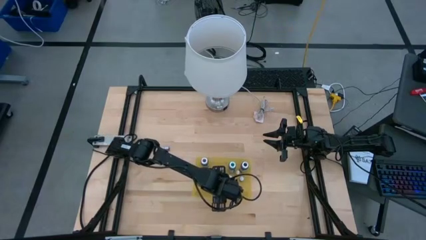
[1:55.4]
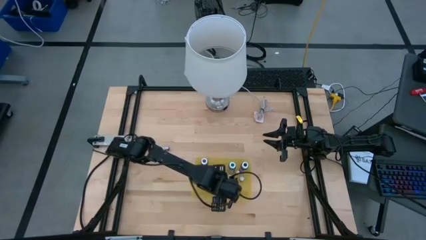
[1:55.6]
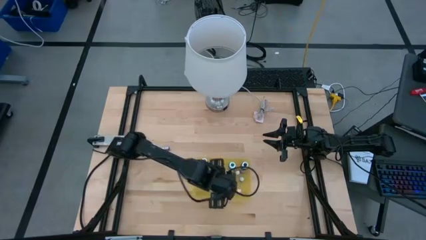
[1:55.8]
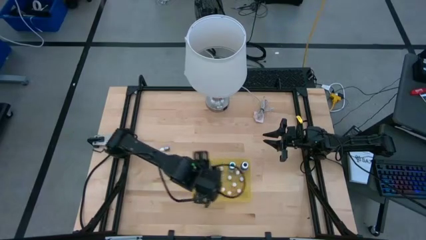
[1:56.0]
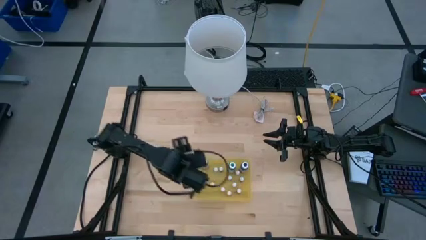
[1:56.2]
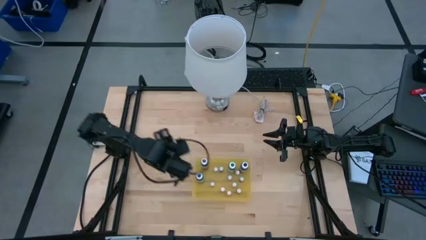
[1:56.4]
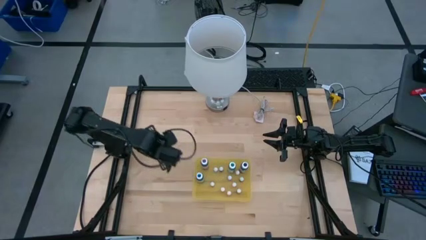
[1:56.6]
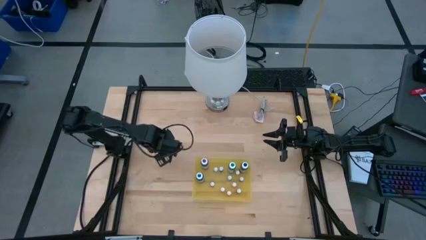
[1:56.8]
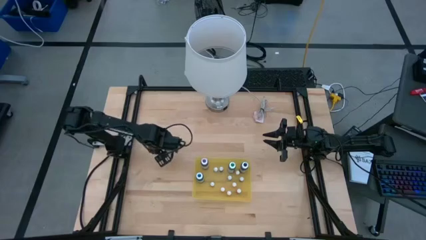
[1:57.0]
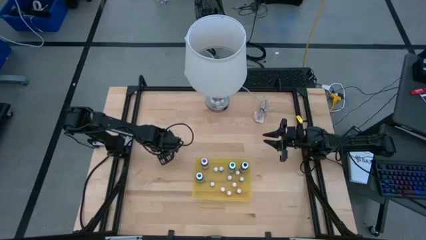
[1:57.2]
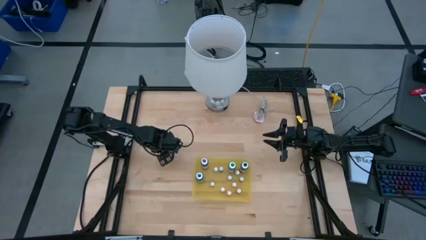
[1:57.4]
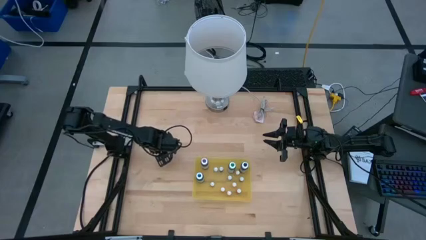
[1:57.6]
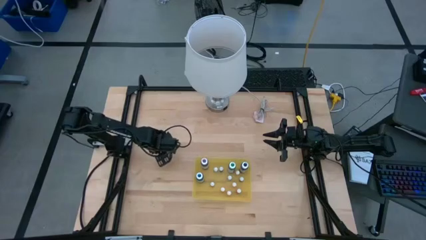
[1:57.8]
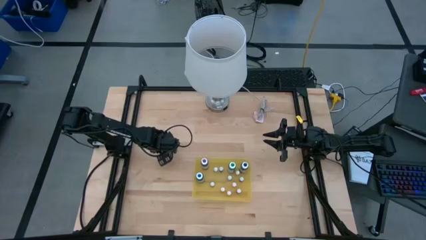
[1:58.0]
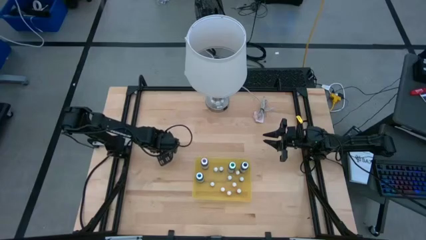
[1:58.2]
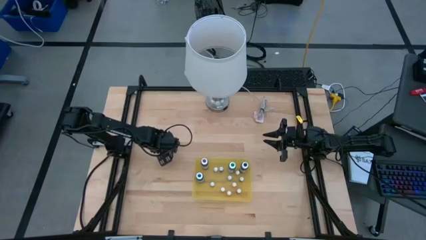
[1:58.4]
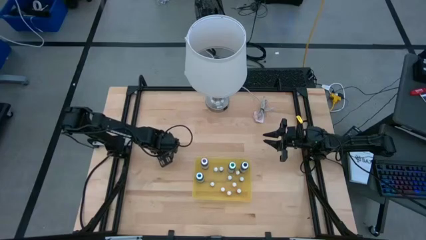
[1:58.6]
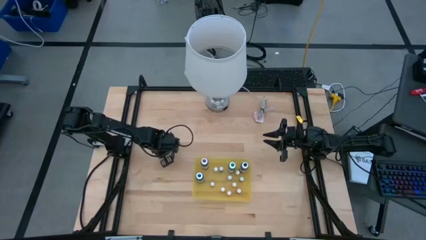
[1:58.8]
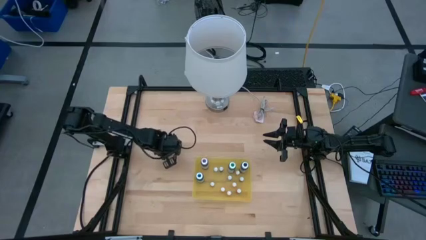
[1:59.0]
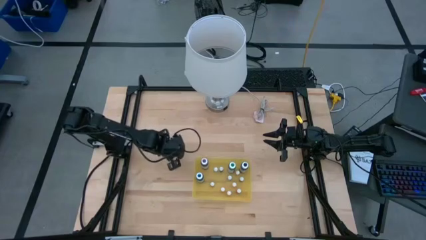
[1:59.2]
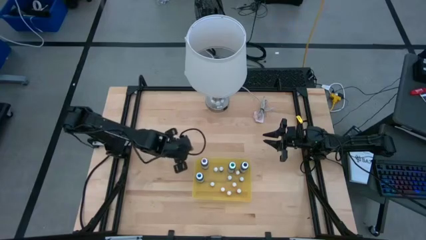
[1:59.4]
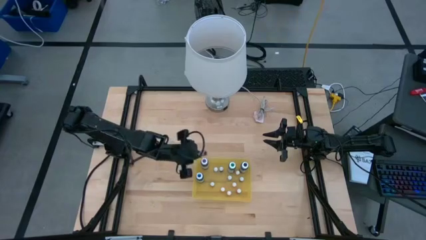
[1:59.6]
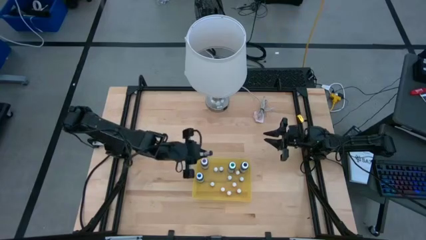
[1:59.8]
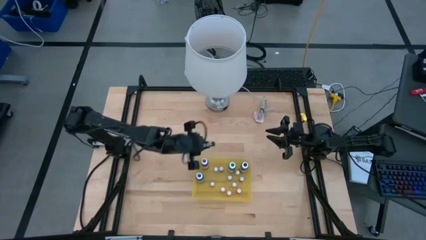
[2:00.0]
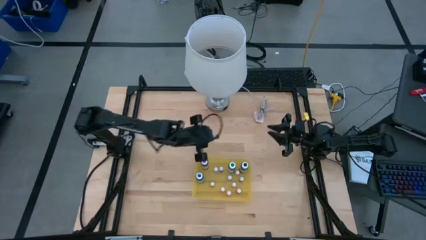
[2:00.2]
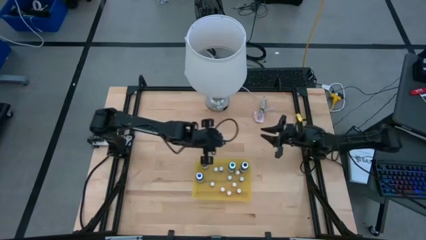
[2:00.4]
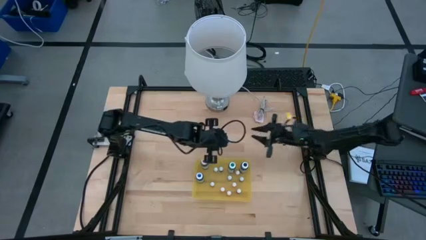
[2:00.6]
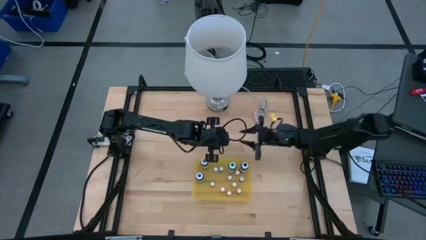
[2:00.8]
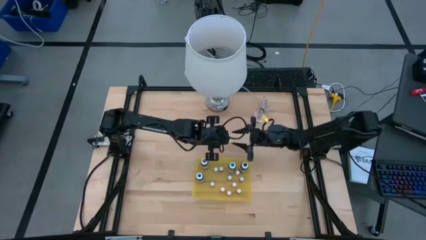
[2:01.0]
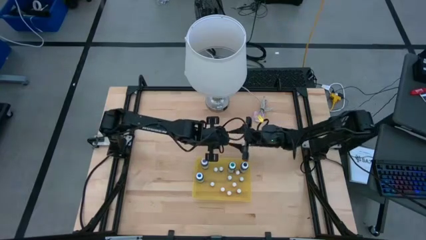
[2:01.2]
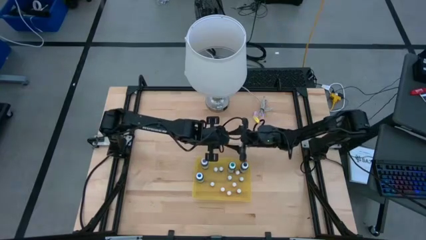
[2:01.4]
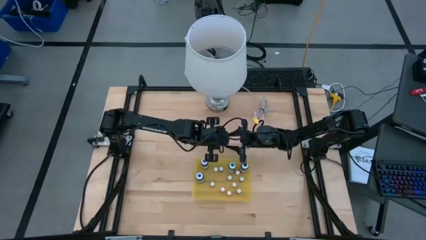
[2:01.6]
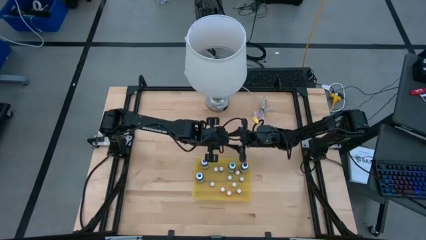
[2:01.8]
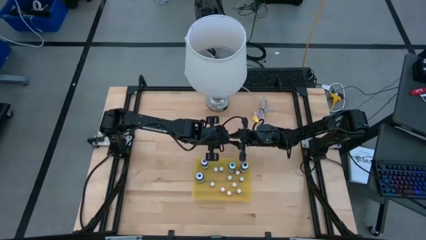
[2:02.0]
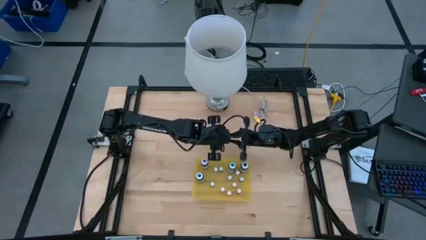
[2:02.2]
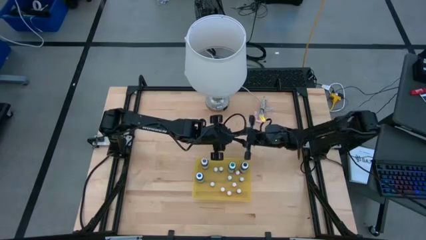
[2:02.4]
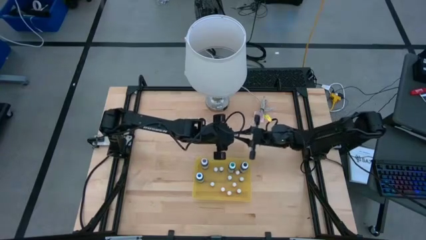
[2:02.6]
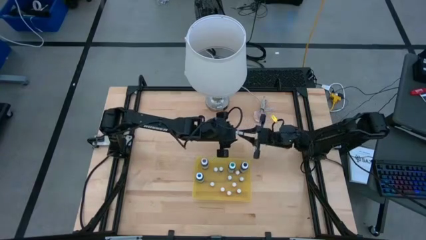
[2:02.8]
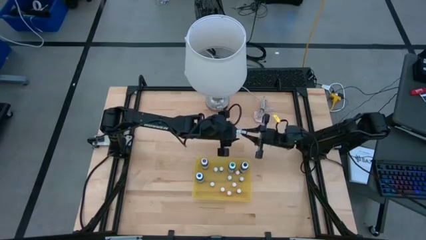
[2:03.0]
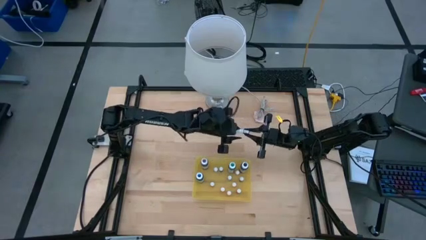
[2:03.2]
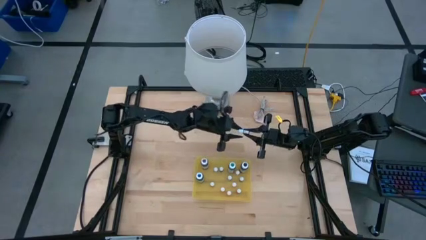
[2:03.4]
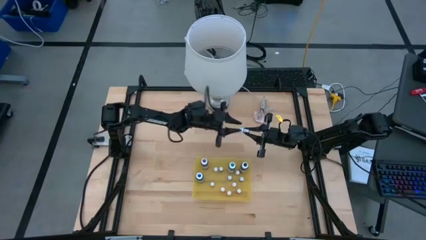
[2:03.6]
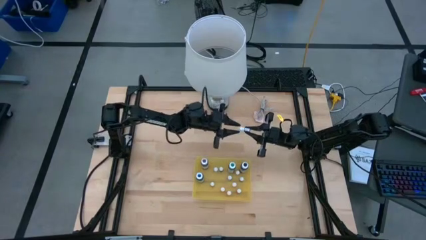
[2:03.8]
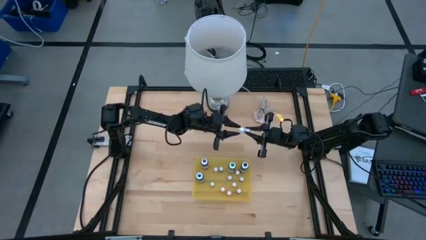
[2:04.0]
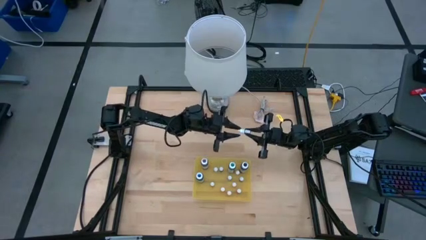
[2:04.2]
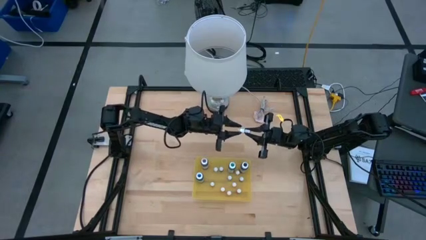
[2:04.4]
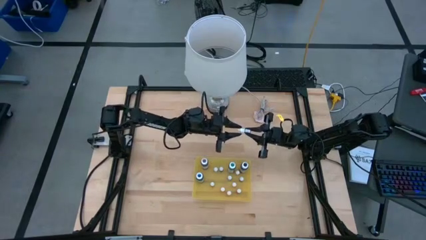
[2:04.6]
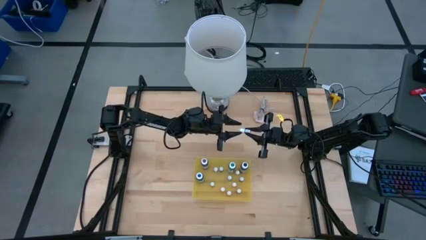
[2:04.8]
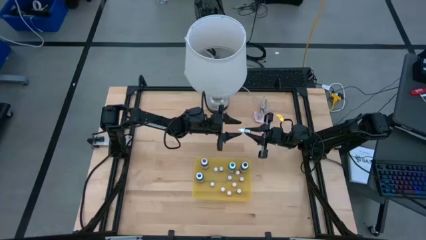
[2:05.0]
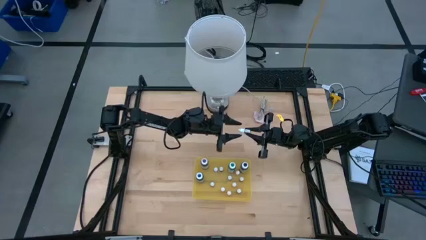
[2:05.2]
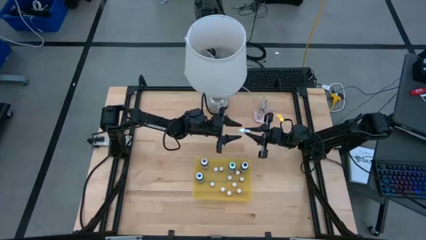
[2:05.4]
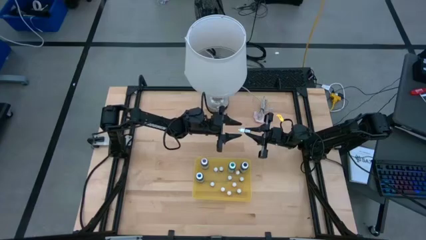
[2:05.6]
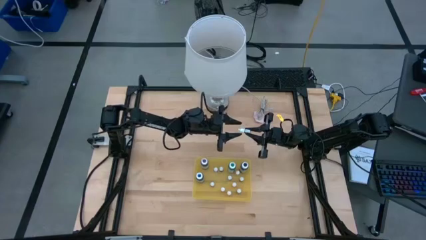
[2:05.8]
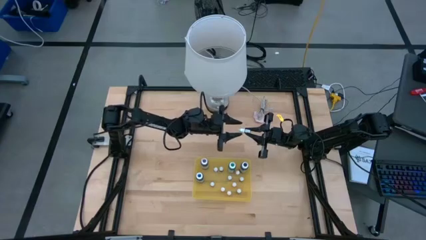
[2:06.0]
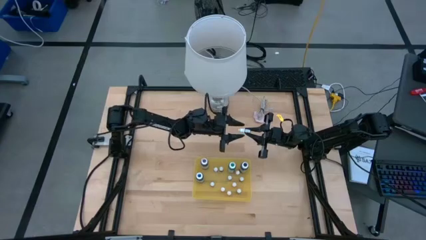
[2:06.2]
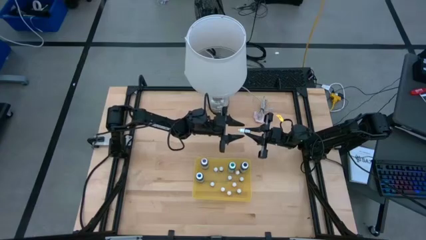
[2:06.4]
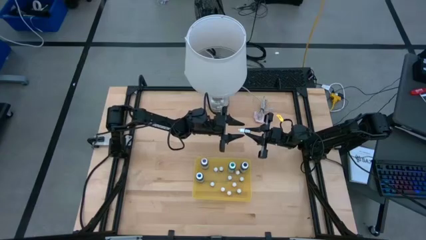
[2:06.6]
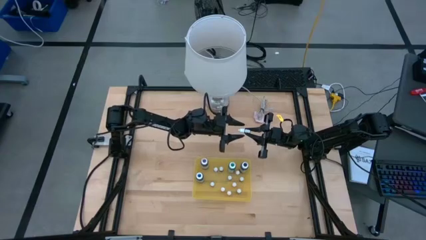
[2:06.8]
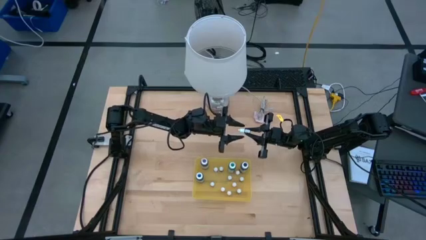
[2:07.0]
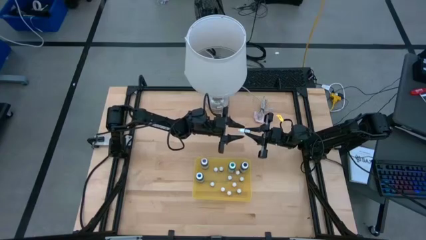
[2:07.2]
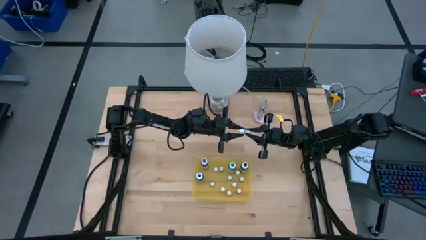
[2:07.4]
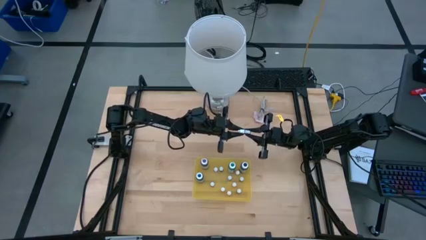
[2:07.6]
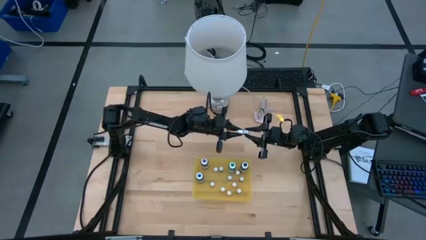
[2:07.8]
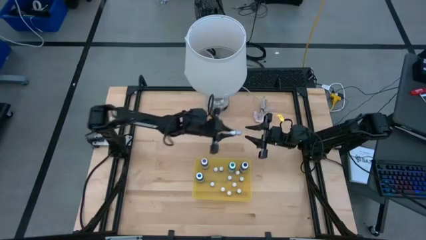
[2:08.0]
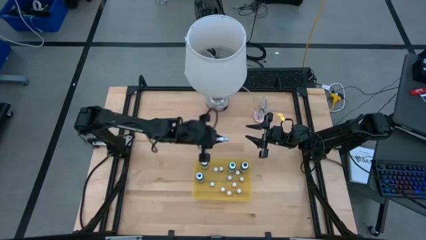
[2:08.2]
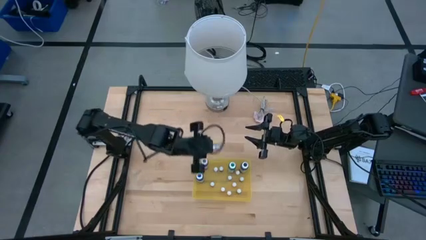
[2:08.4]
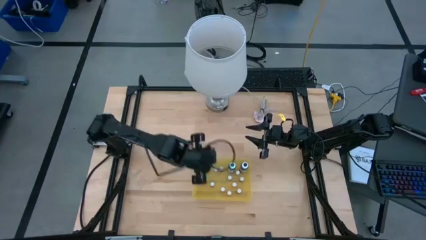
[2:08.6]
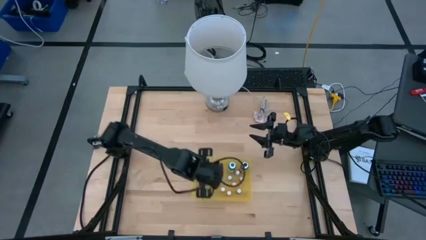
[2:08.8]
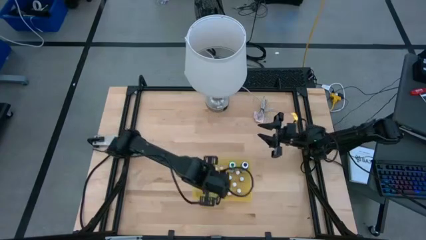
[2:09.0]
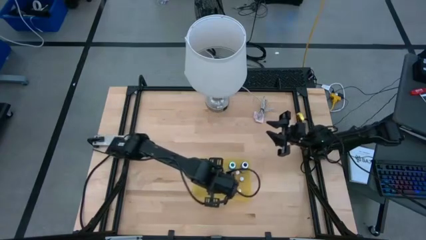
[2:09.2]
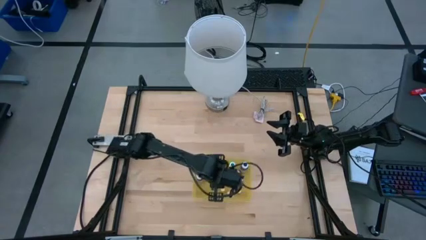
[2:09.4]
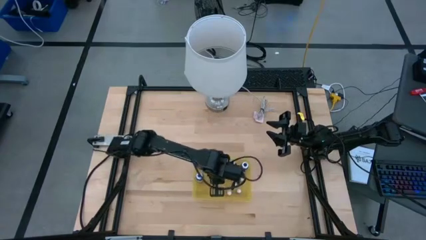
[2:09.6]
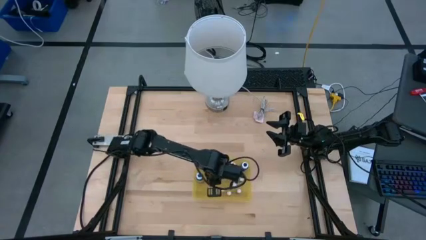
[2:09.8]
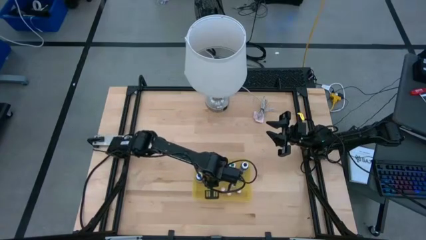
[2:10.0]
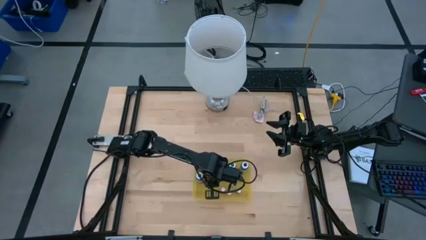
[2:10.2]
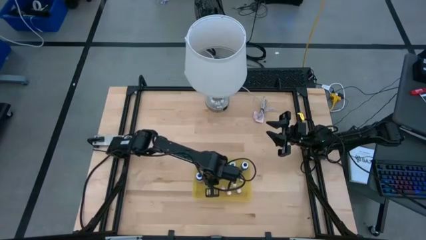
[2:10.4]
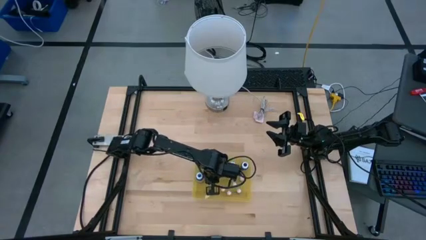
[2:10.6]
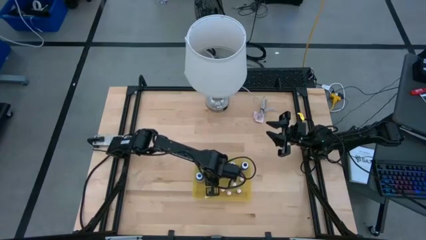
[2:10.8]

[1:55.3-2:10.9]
Task: Pick & Place food coloring
Put the small violet food coloring bottle into the transparent bin

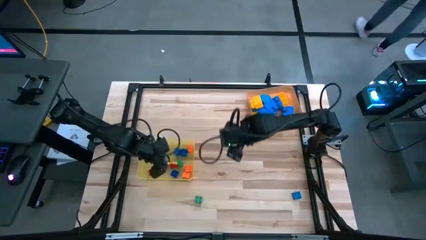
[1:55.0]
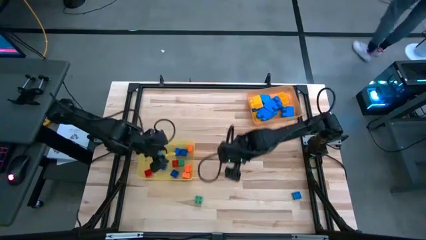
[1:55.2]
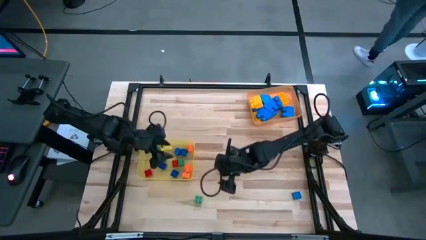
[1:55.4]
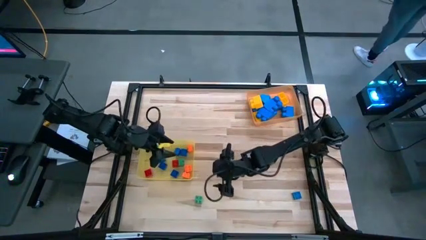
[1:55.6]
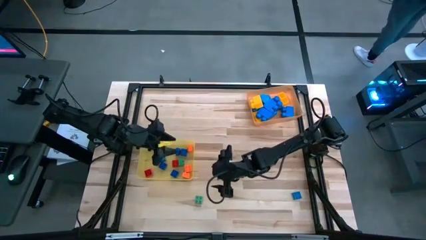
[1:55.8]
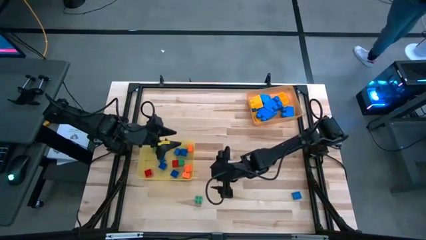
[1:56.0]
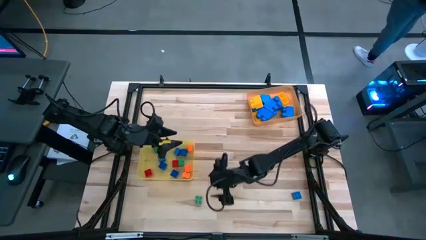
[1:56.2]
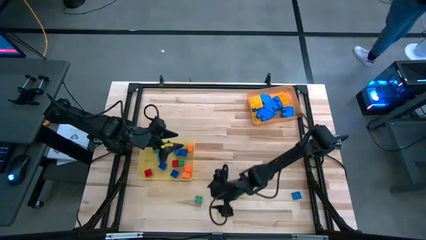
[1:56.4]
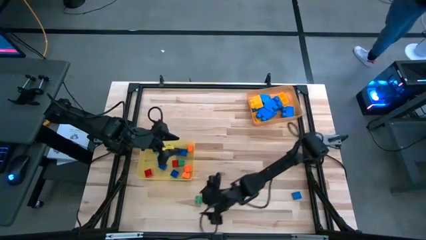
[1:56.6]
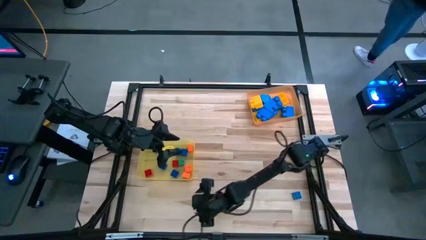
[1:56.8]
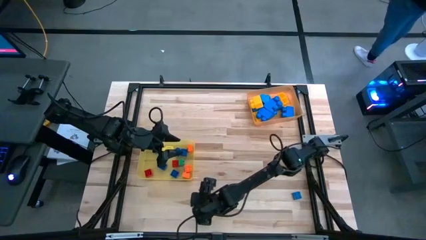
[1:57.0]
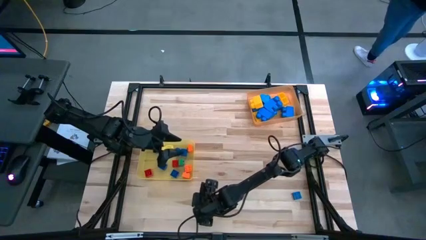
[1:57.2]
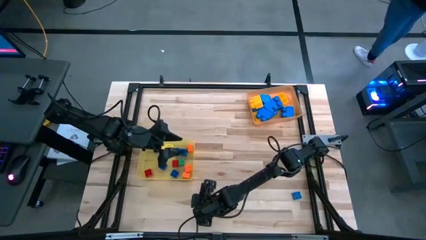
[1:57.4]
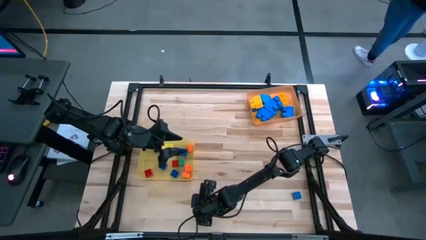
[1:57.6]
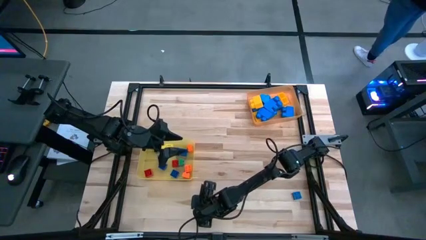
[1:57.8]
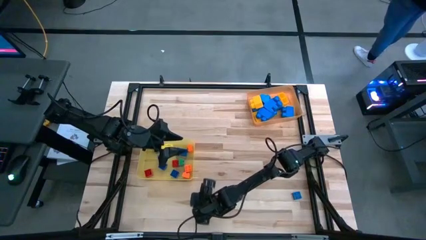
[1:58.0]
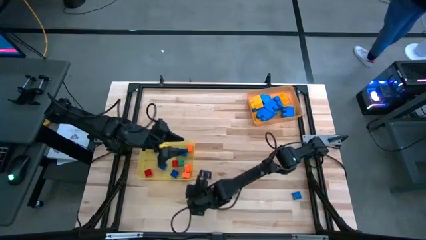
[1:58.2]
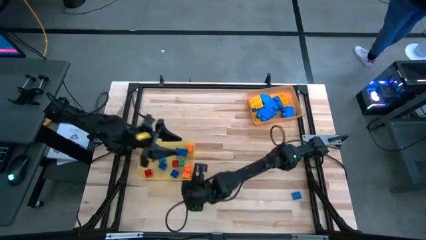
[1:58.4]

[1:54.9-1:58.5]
Task: Sort blocks by size
Put the small green 4 stud game piece into the yellow bin
